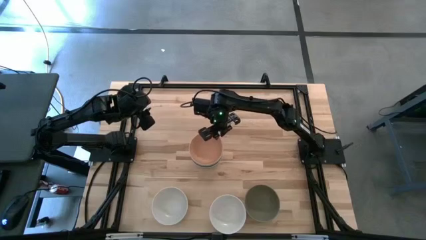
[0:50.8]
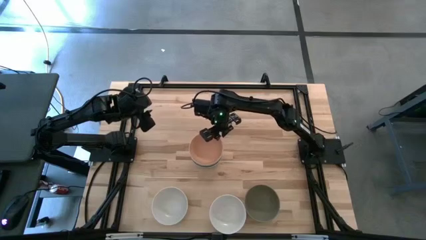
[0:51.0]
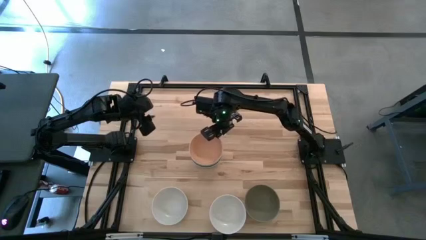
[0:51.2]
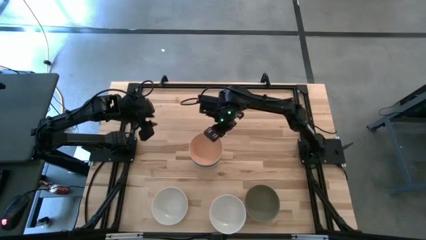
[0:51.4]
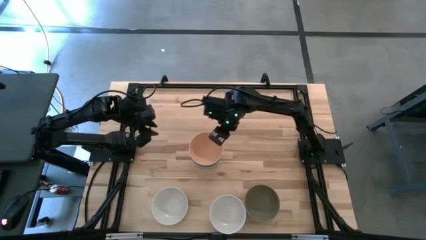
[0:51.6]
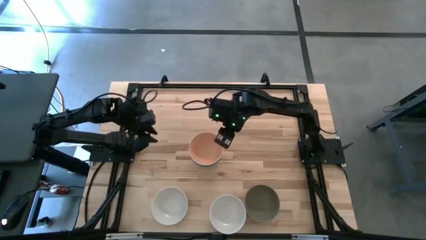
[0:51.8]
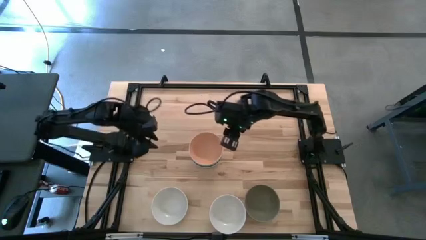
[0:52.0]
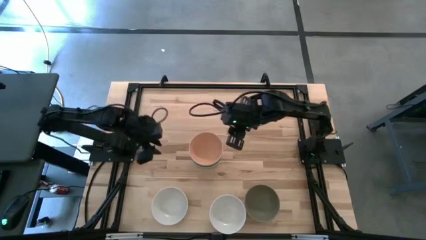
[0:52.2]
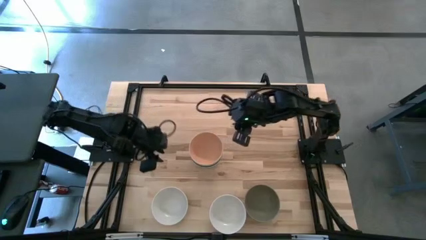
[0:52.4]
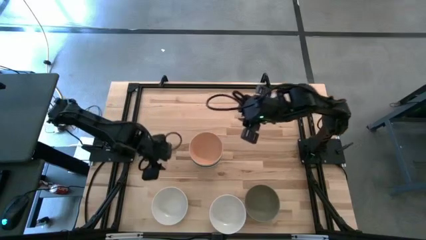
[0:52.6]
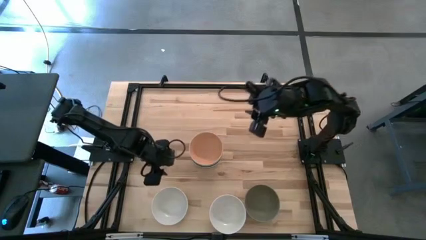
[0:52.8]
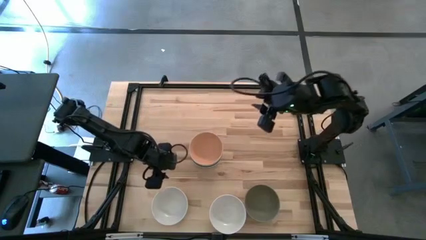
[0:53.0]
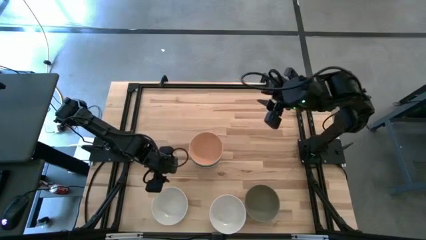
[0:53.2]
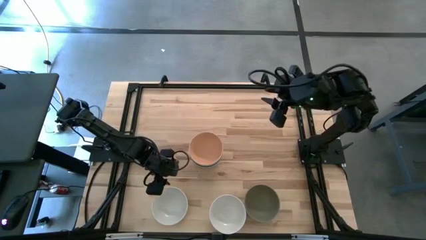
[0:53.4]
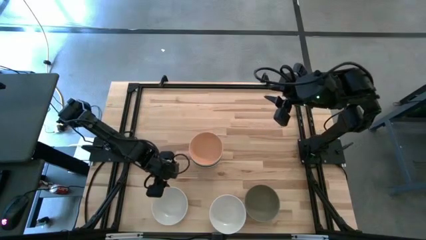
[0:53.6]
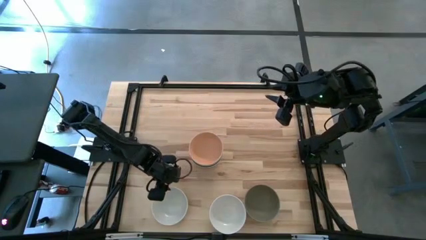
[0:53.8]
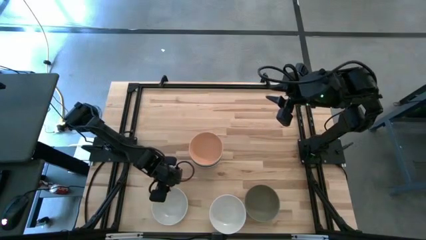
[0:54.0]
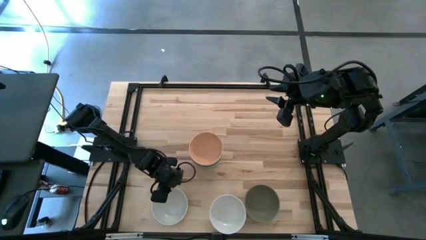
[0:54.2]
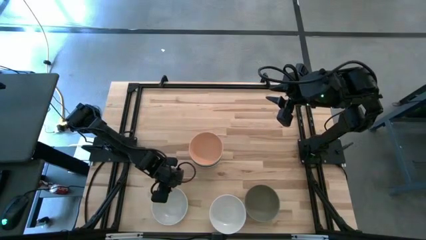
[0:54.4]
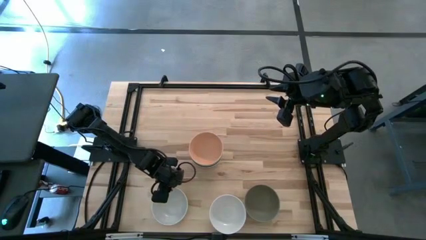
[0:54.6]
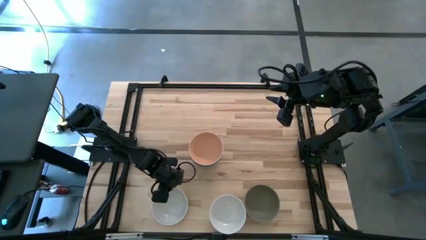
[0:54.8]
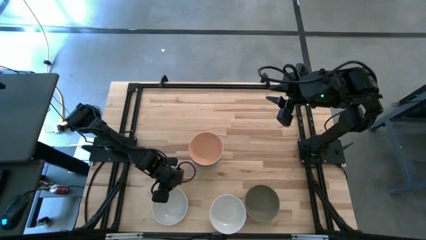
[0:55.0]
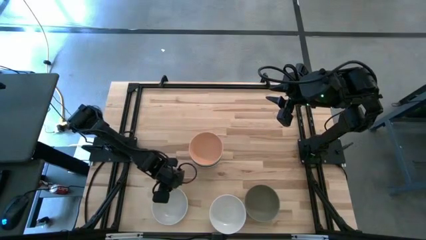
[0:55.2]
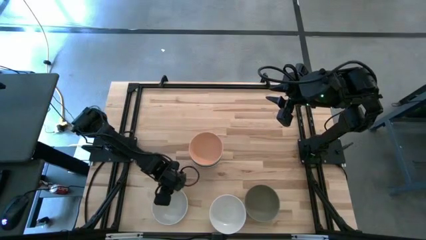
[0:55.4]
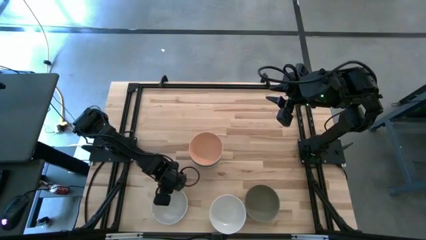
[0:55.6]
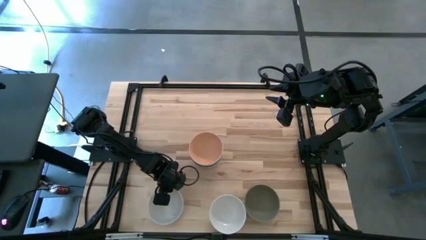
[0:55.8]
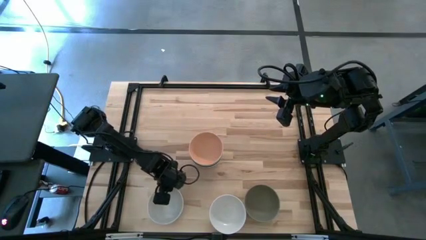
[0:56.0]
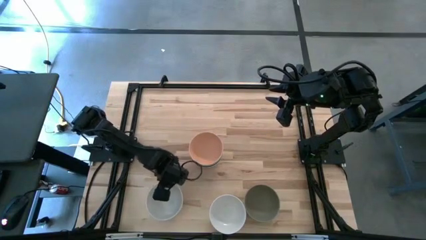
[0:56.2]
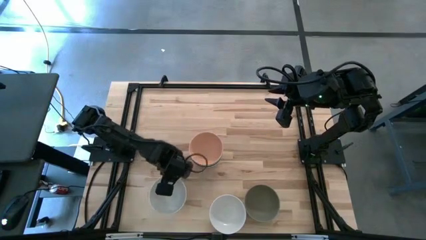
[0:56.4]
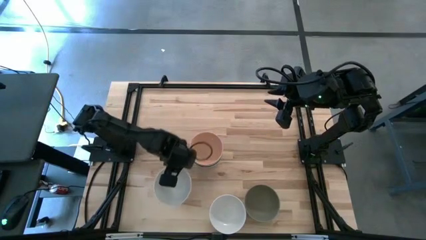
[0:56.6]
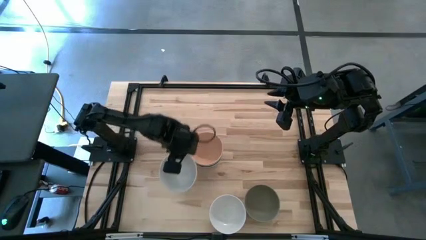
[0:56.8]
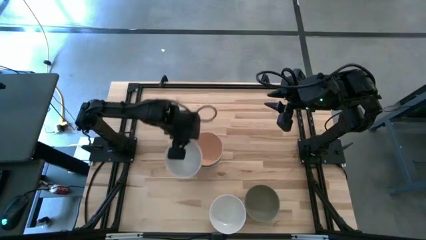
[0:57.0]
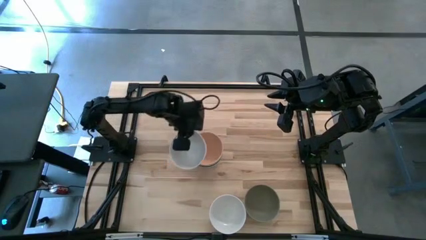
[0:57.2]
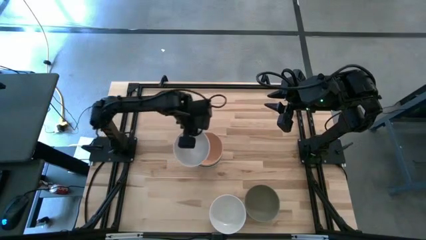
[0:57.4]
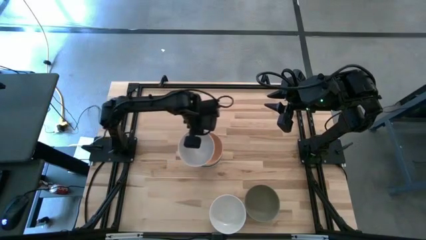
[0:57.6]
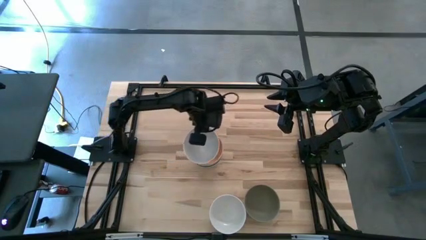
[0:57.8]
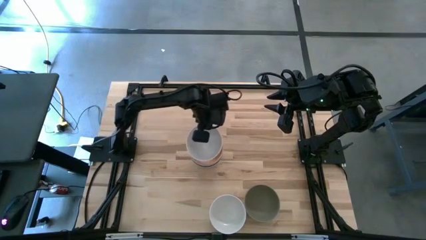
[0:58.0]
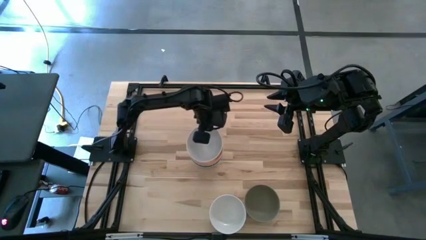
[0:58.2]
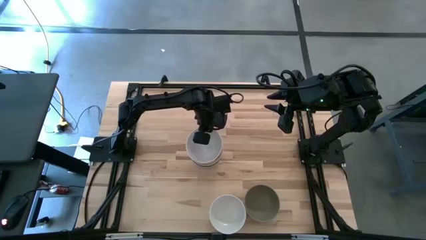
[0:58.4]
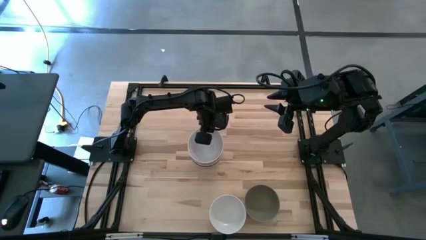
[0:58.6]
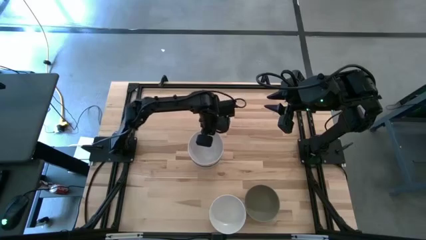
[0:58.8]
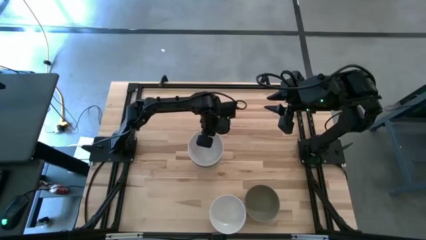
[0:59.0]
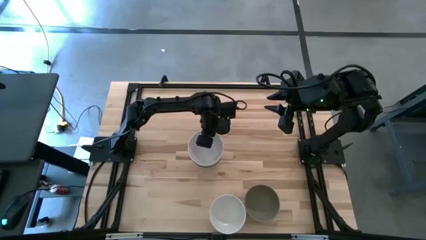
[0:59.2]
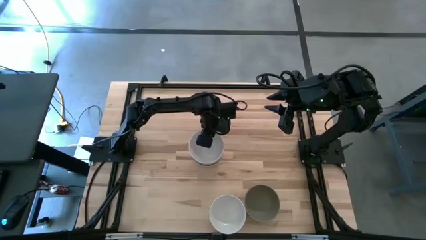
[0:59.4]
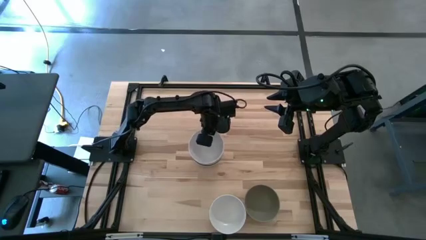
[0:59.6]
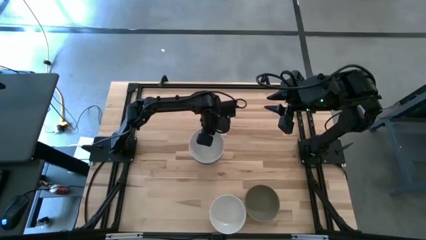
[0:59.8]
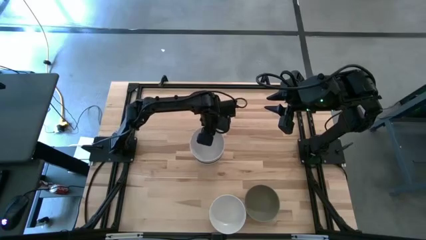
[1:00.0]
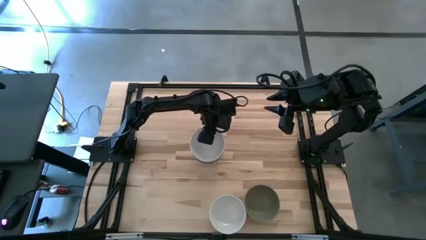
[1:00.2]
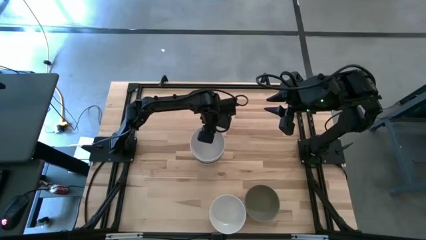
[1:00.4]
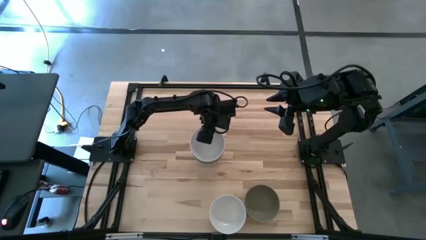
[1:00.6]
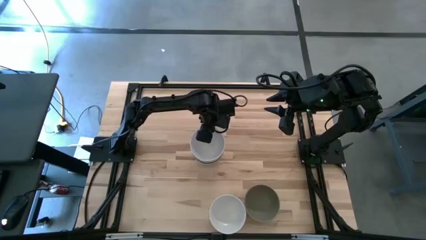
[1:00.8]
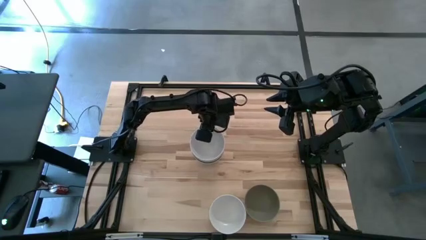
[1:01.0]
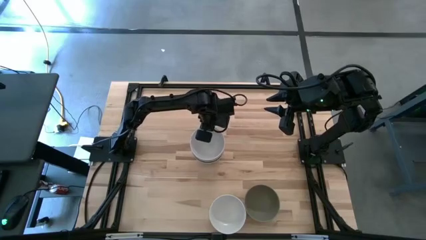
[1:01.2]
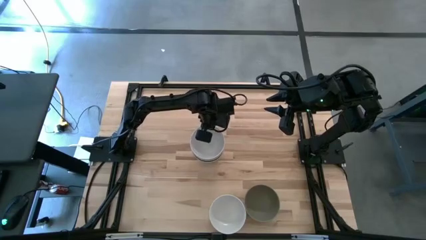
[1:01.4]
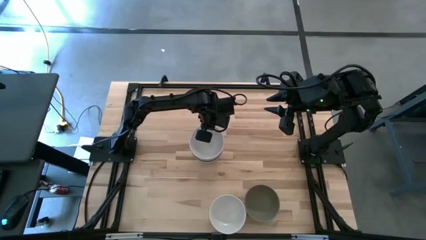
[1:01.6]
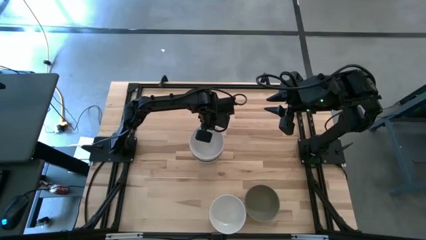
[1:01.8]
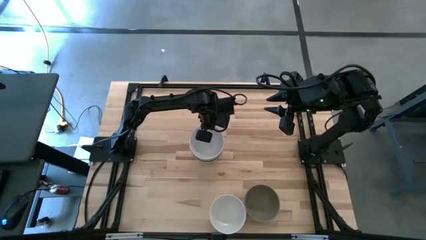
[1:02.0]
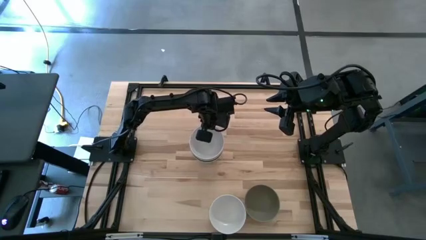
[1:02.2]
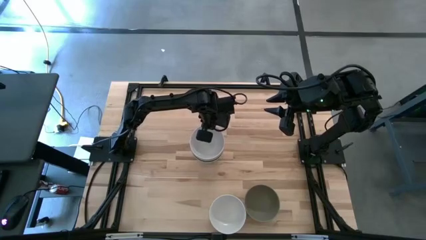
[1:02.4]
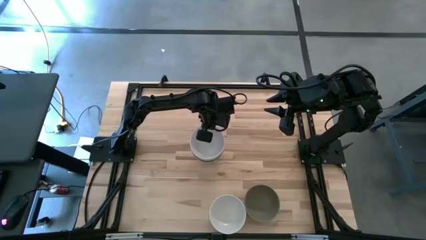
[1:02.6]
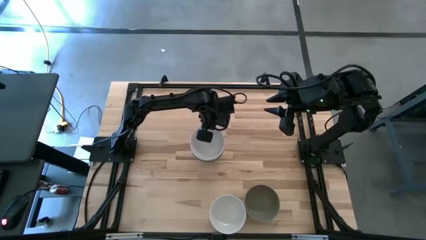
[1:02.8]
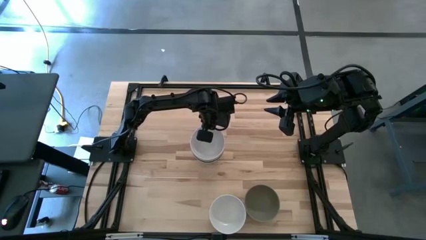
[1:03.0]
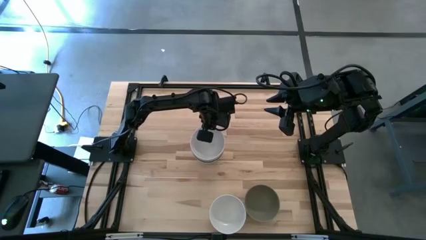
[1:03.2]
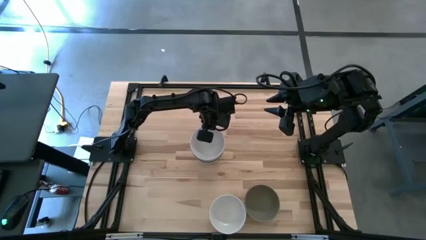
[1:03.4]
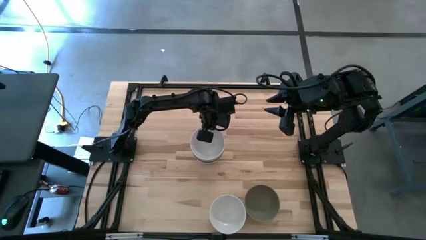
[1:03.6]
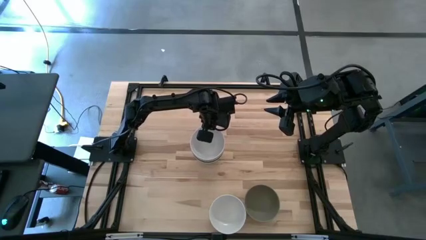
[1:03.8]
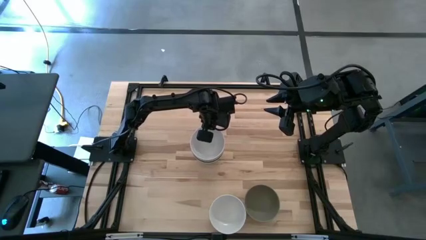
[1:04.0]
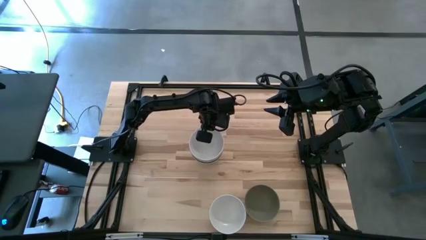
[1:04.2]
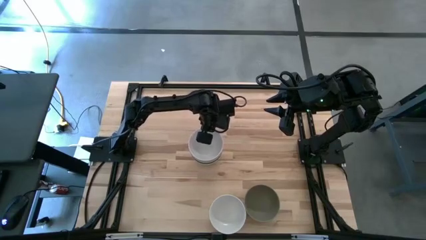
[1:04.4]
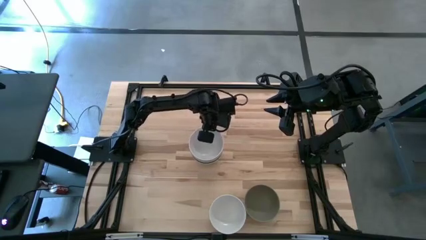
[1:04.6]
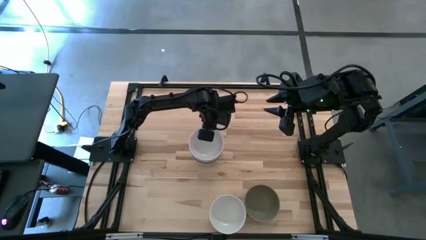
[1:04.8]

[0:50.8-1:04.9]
Task: Nest bowls inside each other
Stack the left white bowl on the light orange bowl

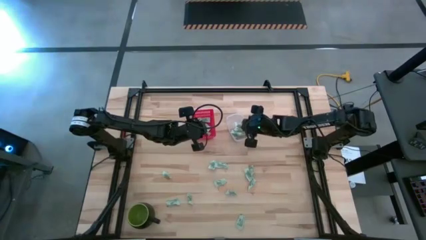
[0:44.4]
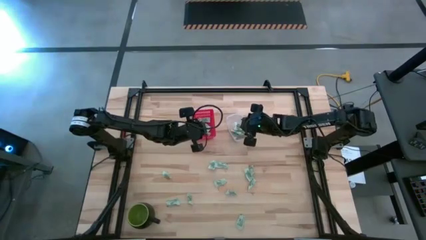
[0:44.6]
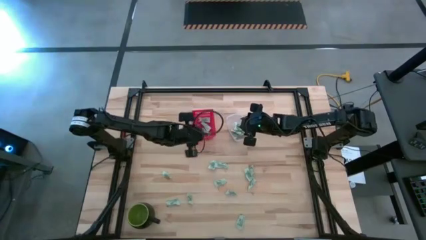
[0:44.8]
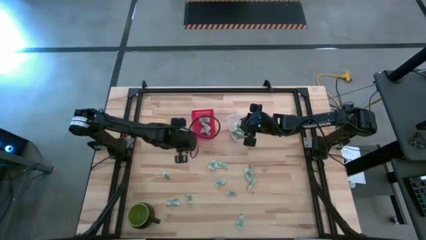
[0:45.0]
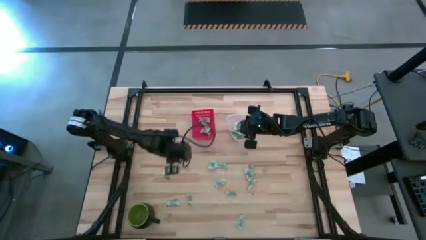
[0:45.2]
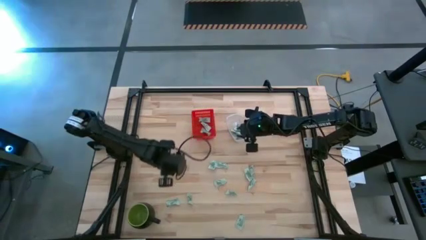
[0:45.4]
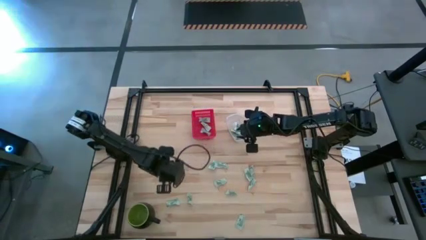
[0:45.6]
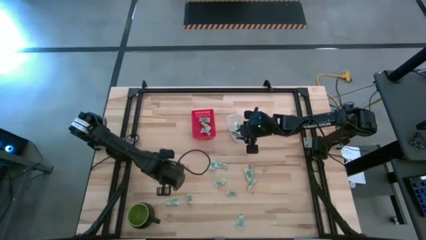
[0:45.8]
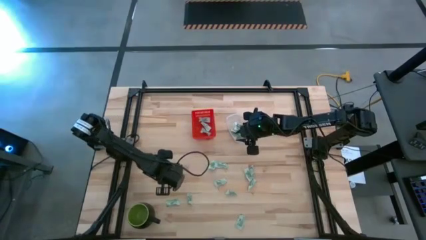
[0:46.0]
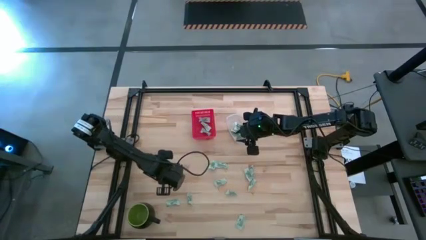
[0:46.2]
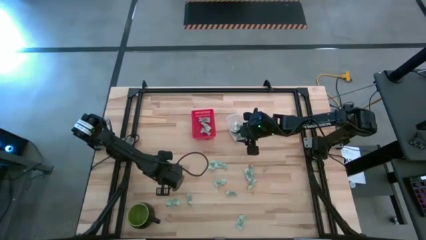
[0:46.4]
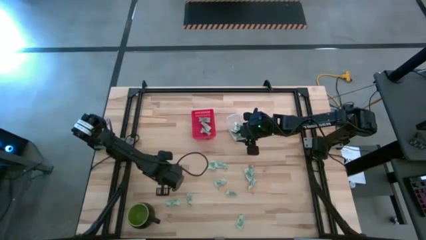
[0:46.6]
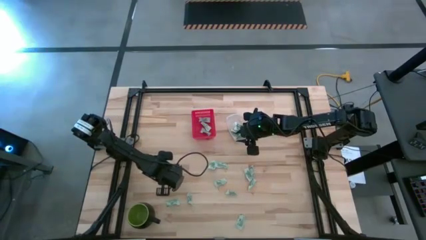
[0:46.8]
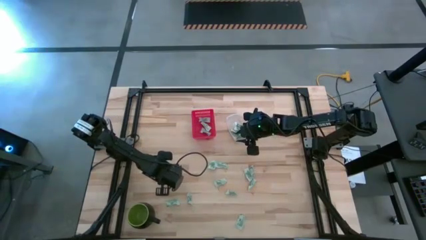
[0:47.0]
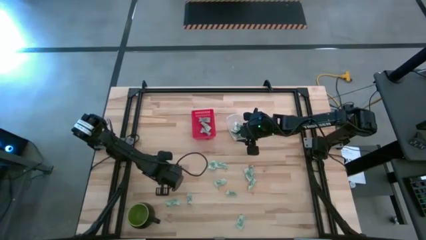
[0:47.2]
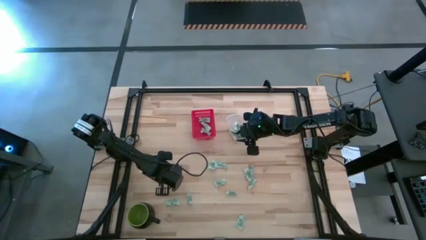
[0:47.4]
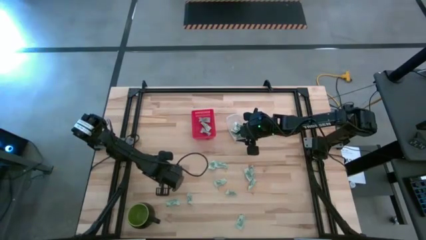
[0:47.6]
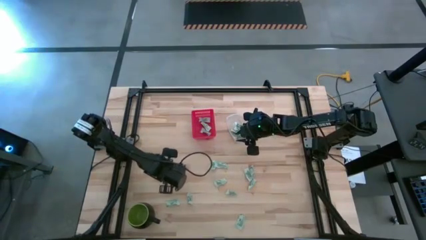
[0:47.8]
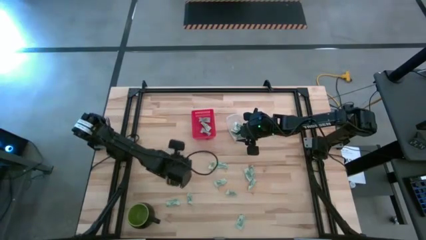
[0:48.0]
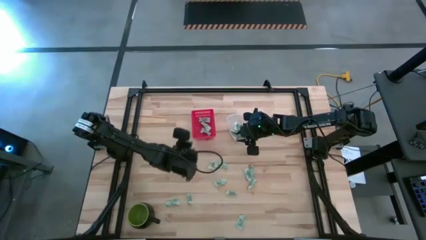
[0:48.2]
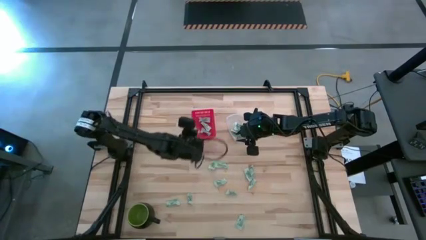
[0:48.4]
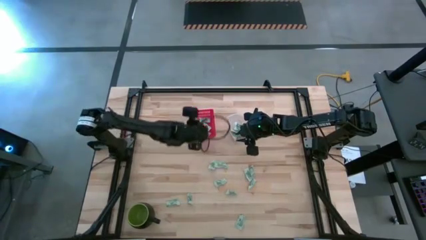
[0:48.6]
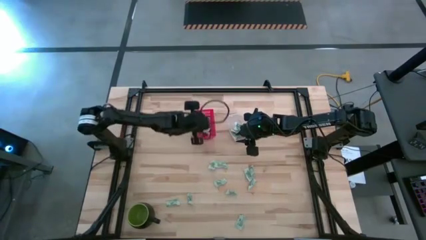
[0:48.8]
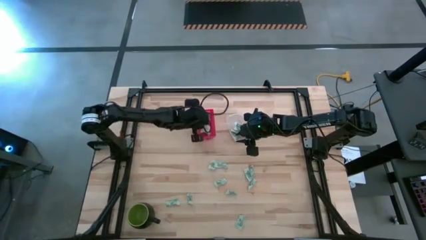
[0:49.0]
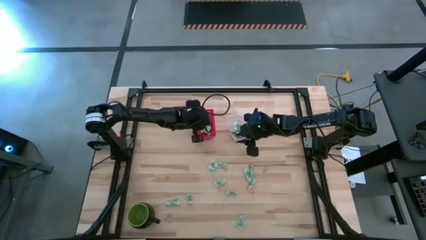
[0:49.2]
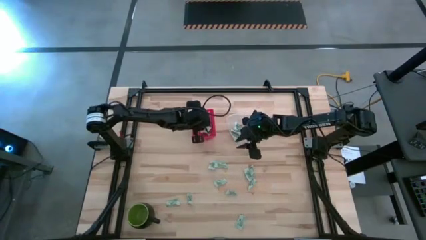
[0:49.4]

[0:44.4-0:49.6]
Task: Pick and place items into bin
Put the white stevia packet into the red bin
